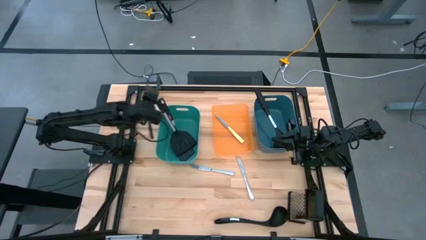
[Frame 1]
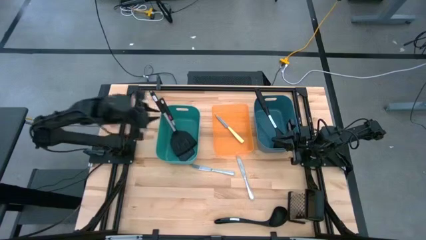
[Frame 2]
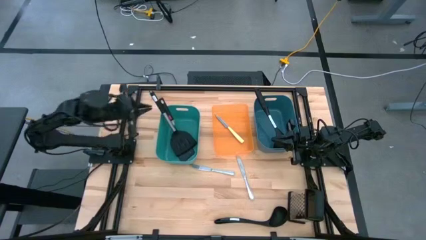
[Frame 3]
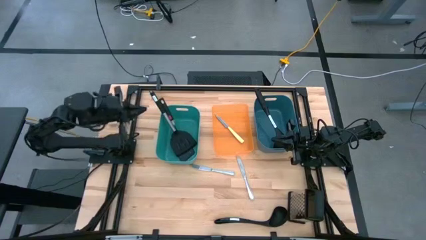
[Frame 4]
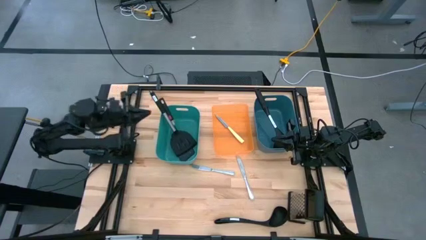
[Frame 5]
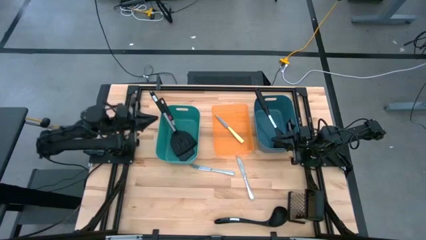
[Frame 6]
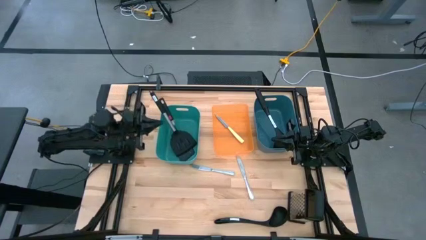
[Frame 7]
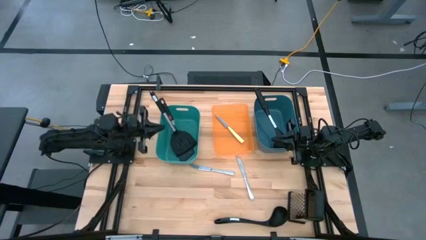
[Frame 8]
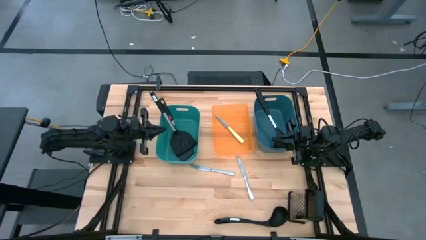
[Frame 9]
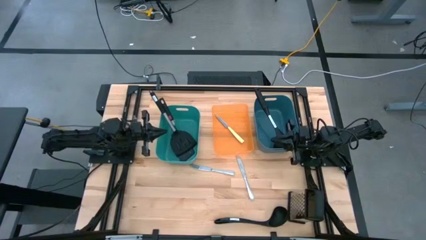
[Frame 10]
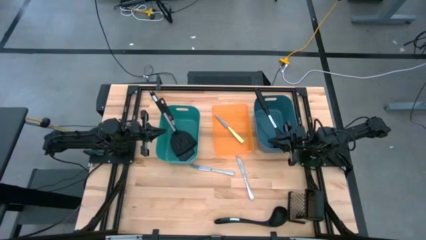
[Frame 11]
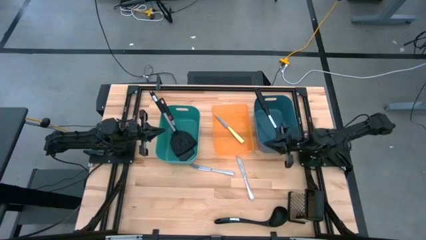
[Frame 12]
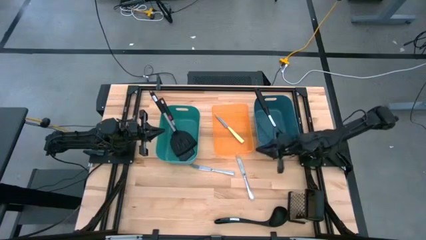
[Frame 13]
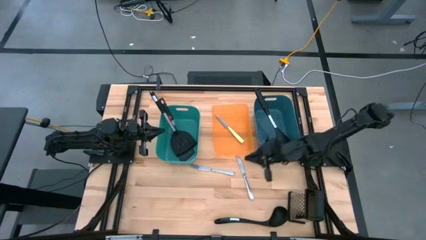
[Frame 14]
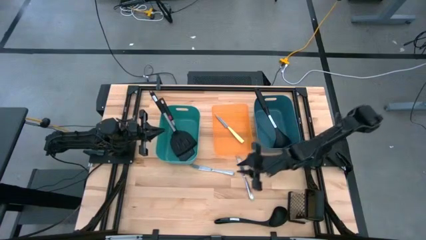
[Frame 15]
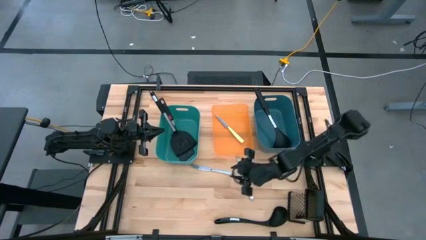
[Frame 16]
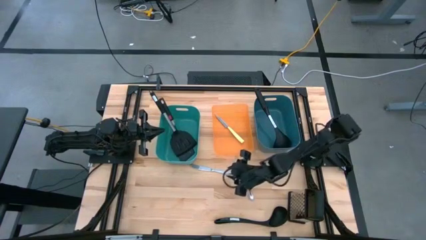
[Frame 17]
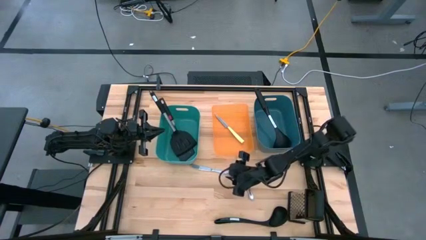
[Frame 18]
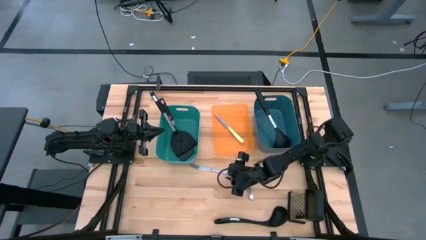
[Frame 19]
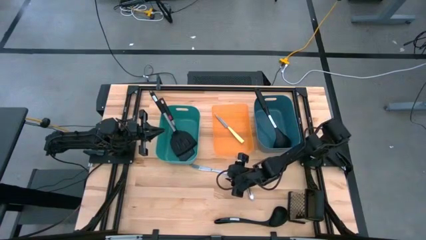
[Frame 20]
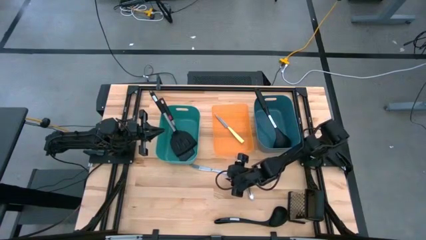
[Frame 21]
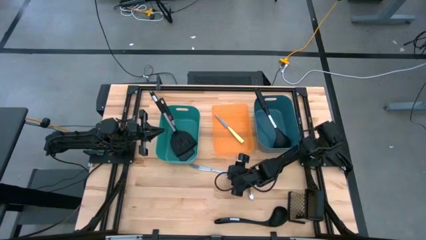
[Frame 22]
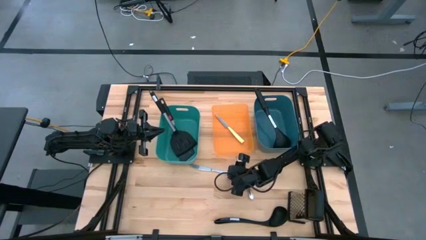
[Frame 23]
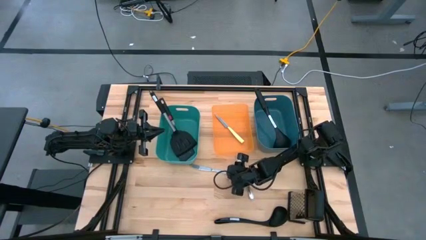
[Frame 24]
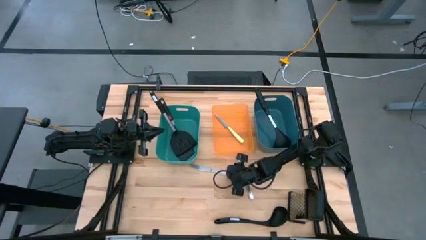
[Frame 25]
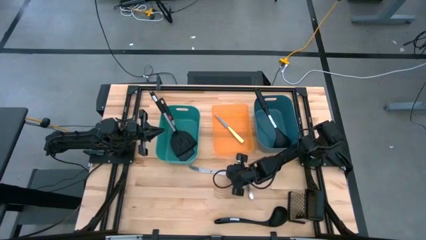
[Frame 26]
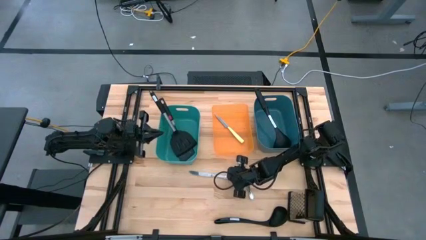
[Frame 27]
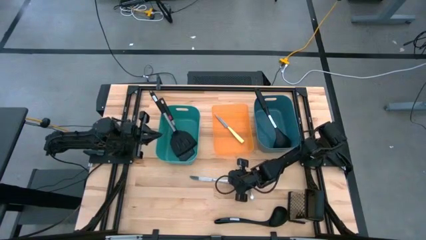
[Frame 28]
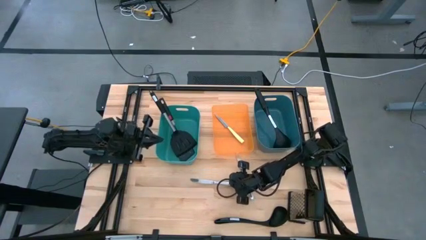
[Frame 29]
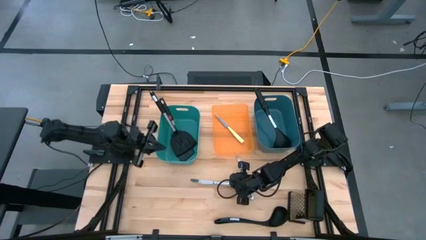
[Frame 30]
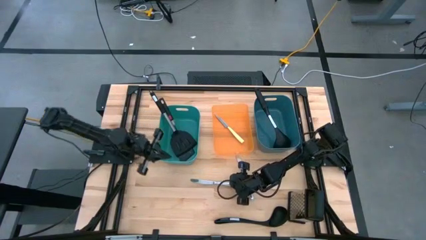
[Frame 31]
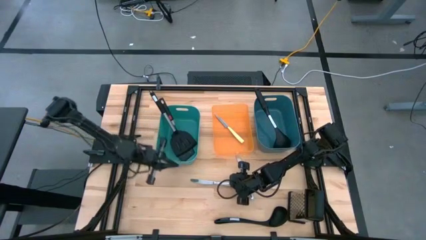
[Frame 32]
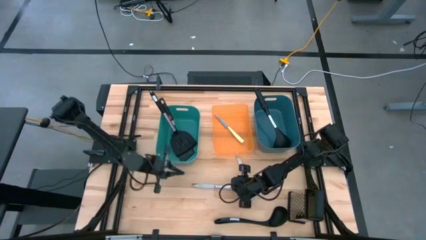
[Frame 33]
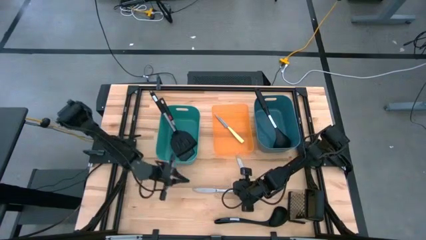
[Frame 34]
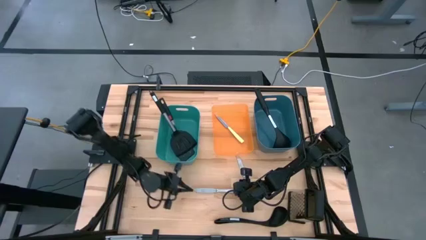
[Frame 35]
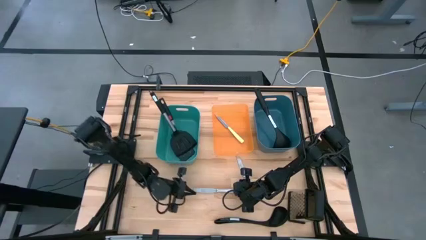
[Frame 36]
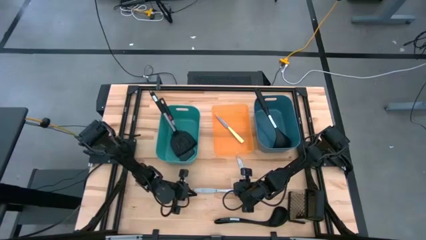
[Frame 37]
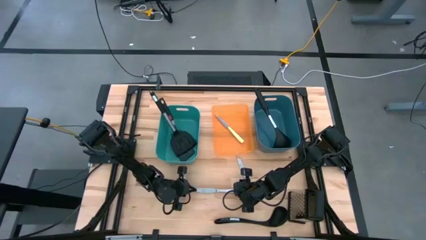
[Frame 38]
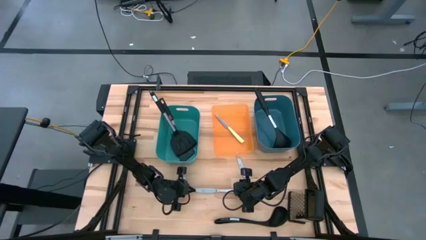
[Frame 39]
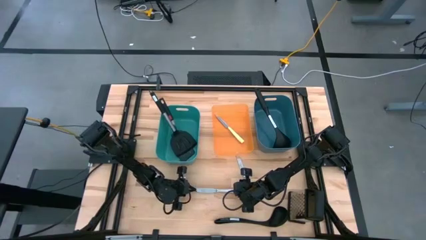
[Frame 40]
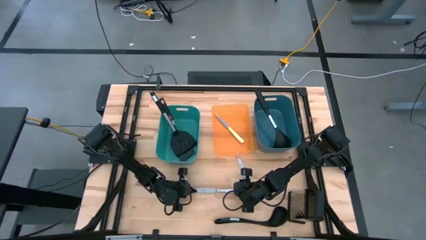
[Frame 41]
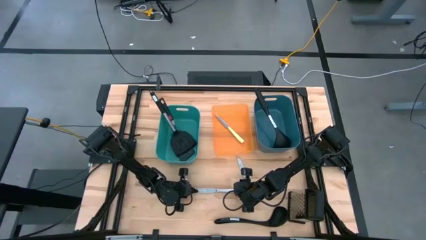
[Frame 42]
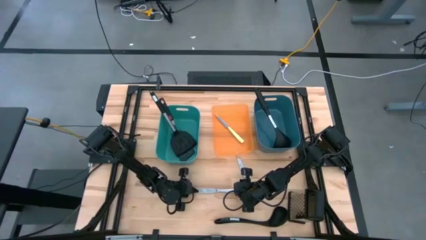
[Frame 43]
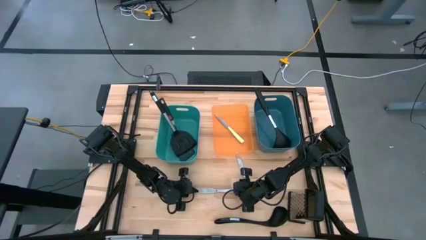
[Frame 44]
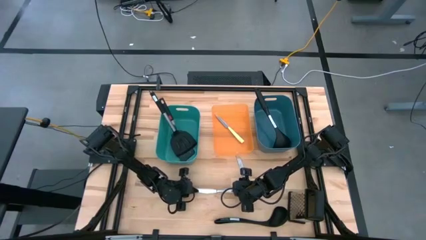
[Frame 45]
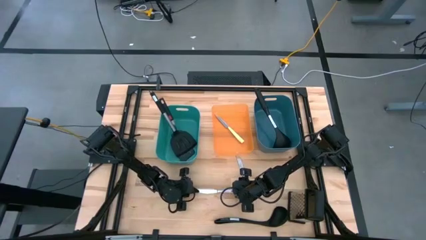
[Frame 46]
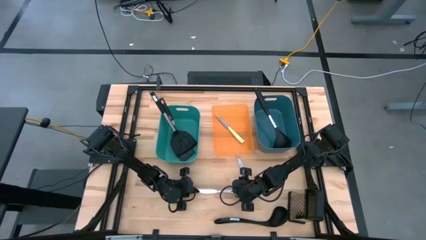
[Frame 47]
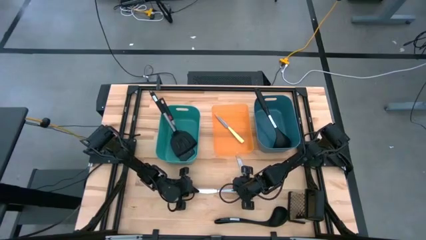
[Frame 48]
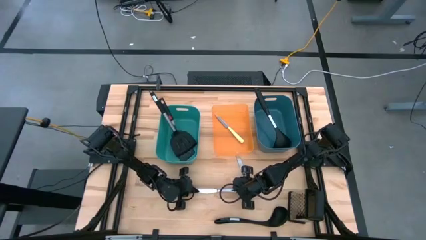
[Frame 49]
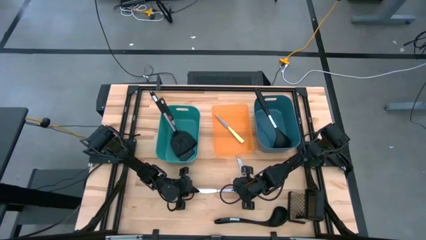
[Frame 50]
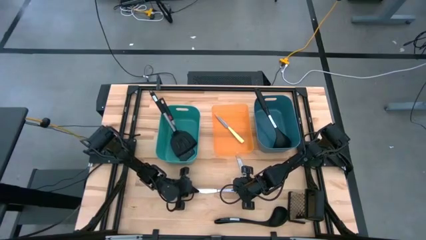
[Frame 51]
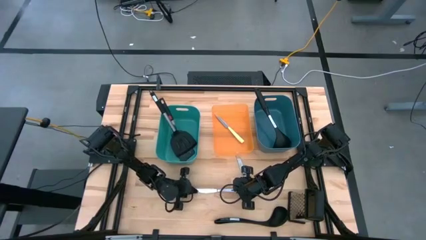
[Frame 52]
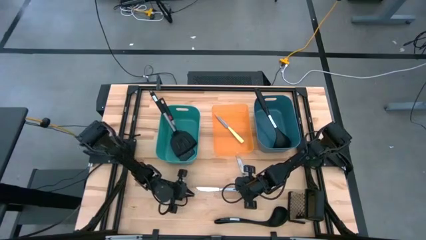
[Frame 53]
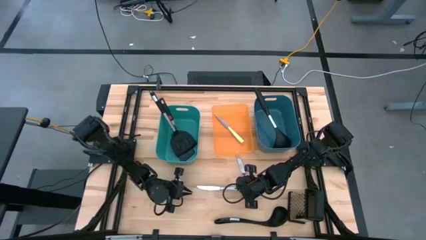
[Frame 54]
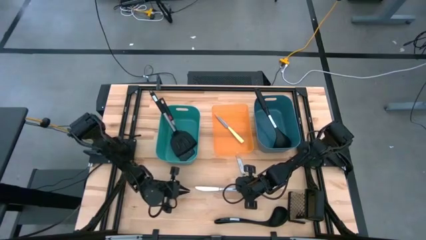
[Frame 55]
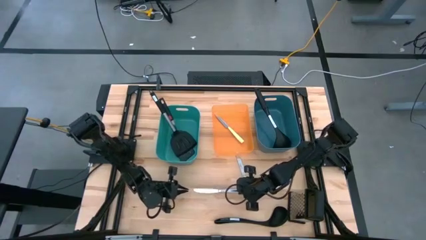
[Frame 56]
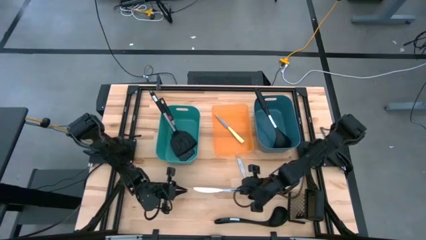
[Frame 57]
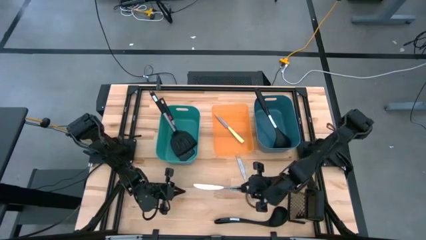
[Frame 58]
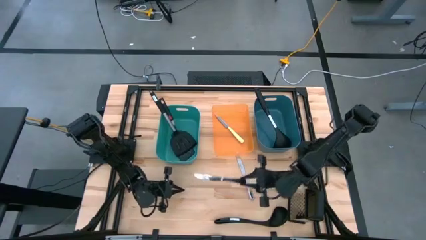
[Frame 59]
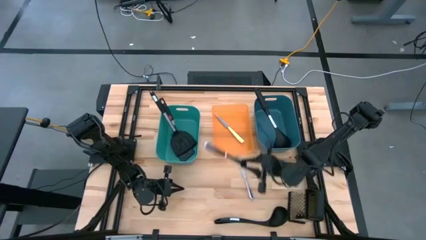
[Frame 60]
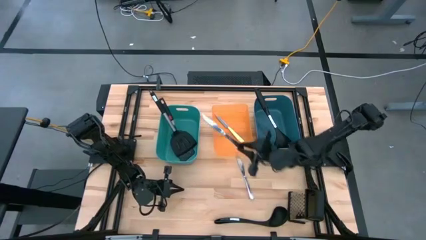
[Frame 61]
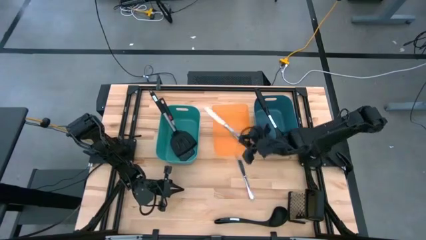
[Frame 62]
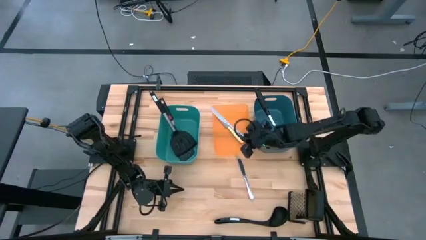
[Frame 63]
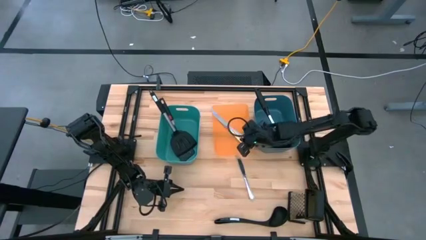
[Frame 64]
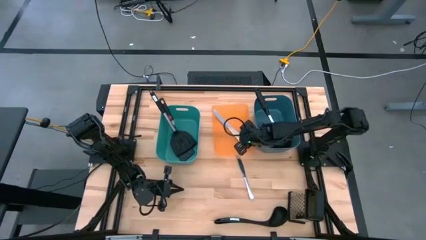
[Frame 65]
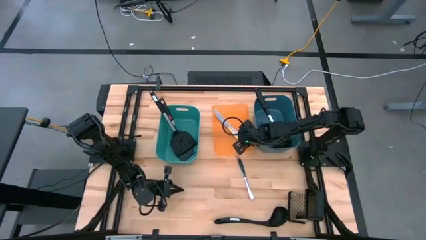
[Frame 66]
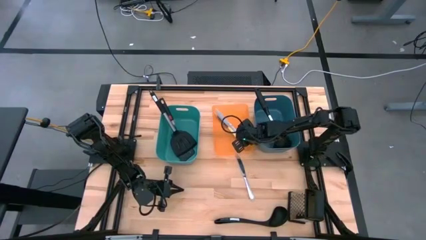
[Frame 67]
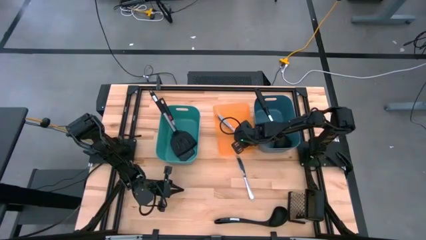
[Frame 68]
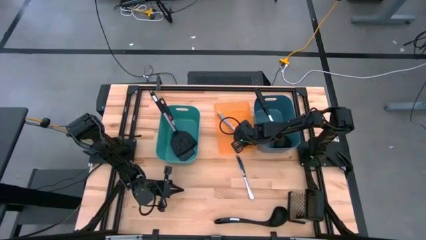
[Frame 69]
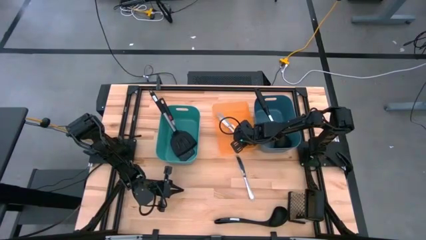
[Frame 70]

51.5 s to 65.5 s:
Task: Pick & Place Kitchen Items
Put the left silver knife into the orange bin

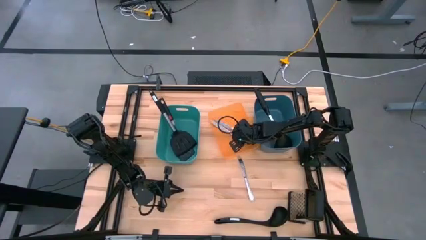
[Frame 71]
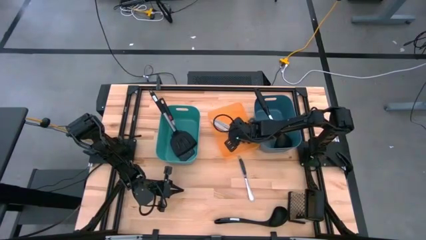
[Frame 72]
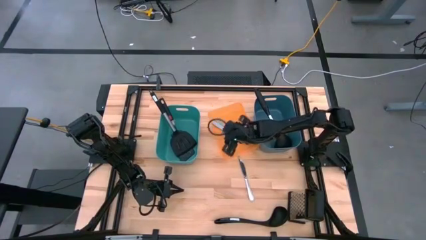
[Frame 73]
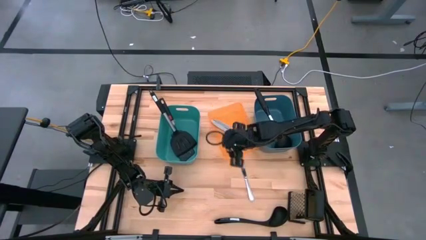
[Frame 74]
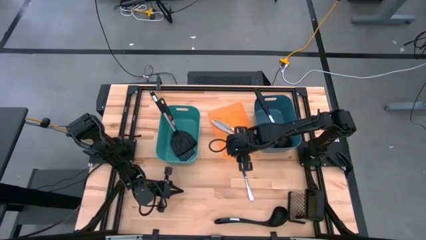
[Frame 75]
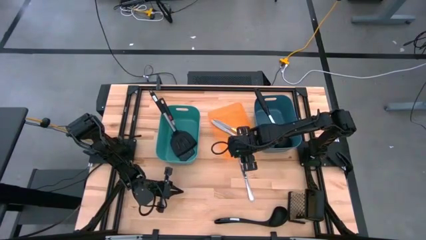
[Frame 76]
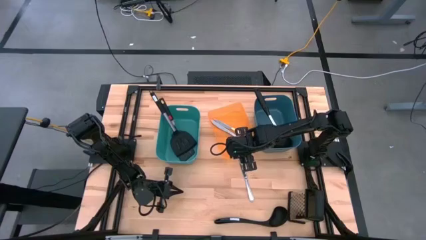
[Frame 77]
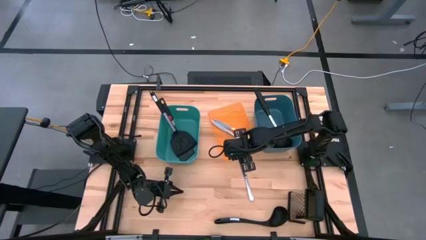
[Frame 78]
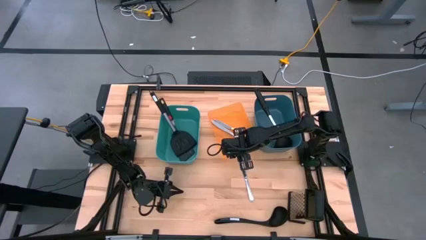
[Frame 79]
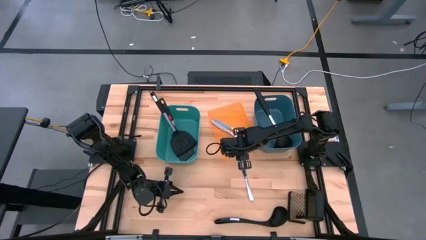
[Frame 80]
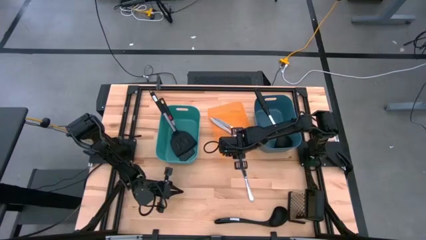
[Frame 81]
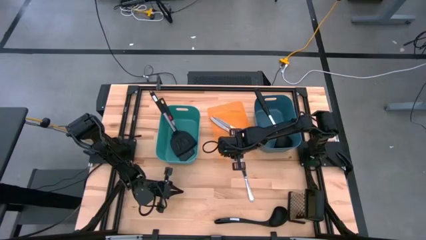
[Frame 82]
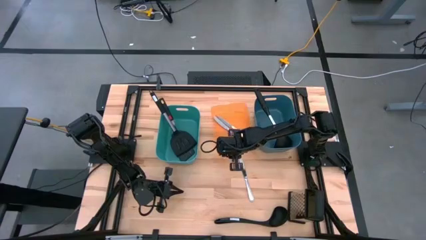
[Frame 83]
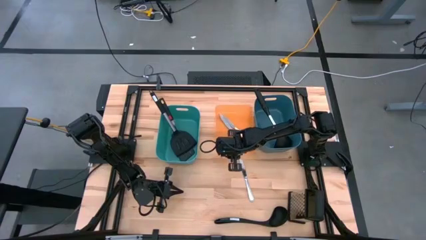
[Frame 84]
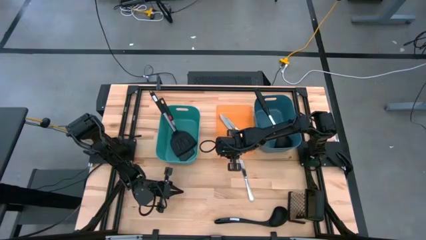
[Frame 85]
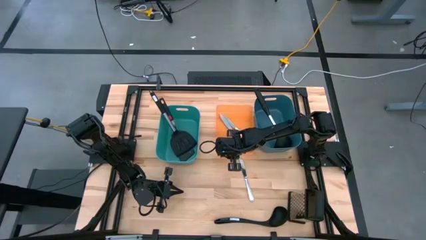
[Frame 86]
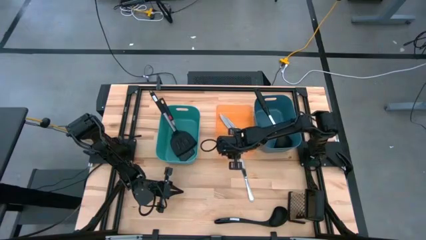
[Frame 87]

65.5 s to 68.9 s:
Adjust the orange bin
